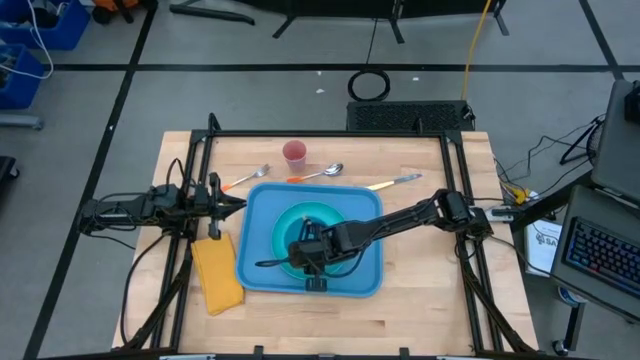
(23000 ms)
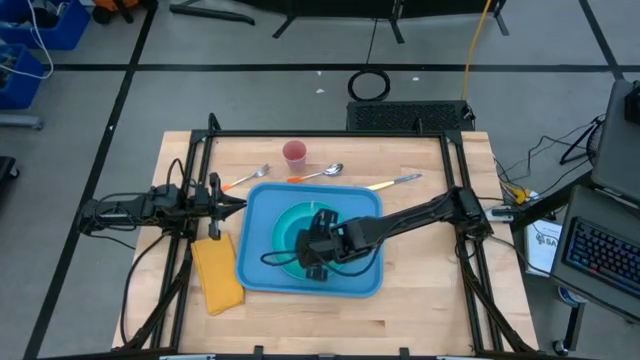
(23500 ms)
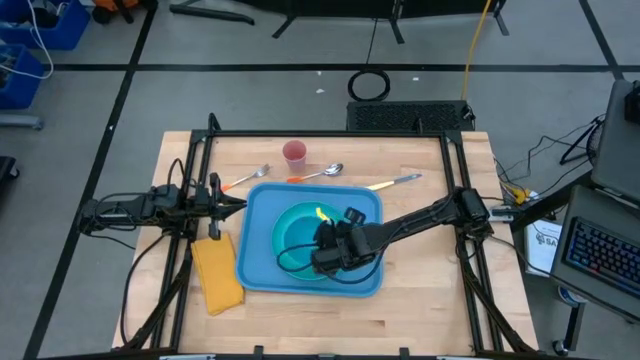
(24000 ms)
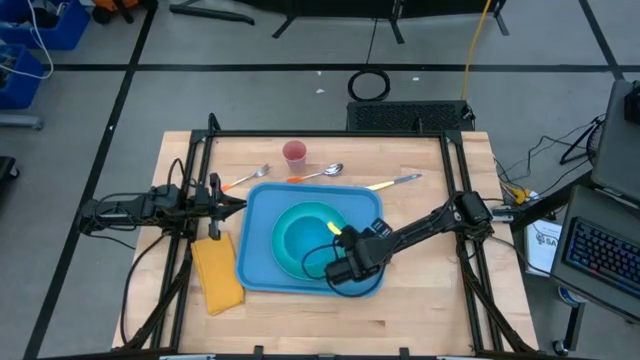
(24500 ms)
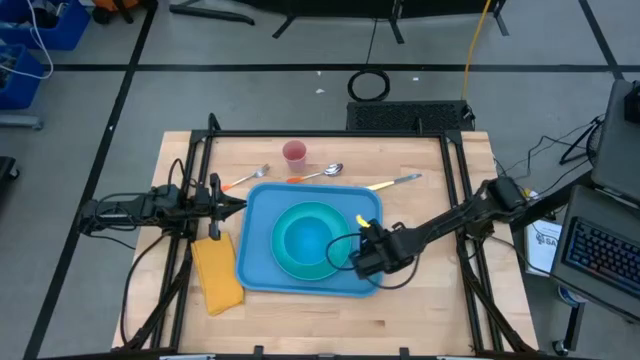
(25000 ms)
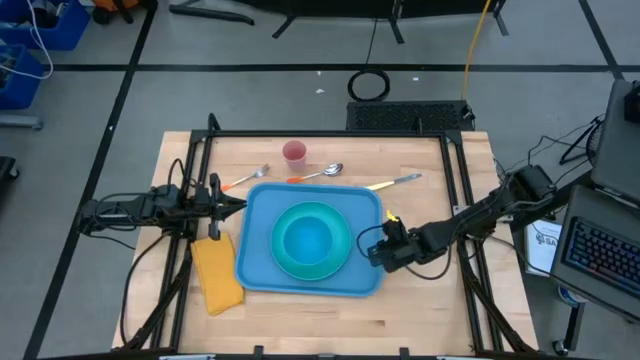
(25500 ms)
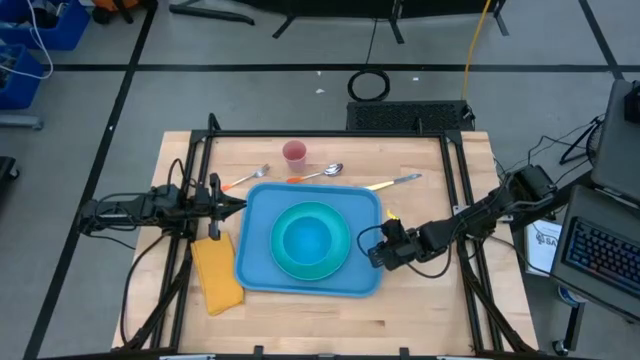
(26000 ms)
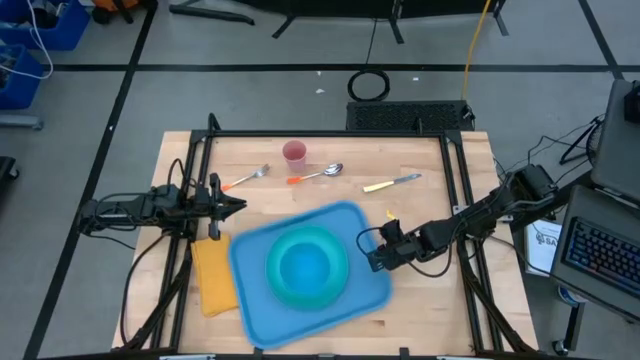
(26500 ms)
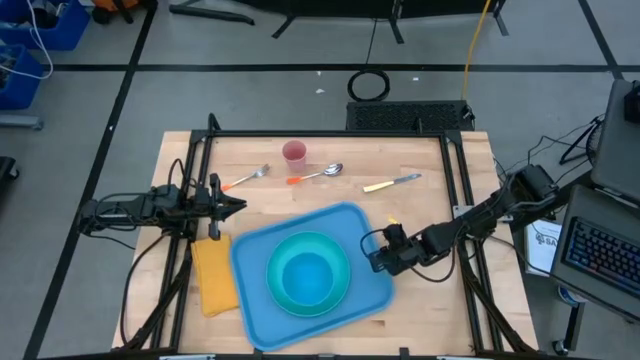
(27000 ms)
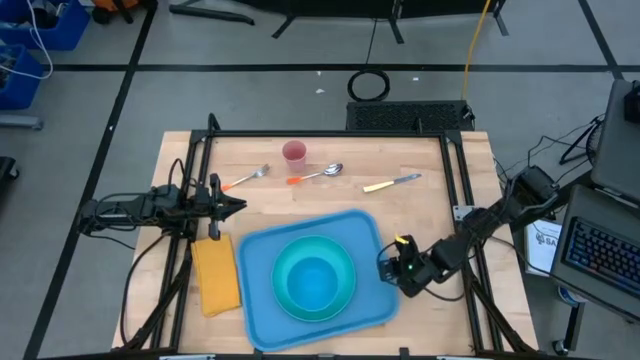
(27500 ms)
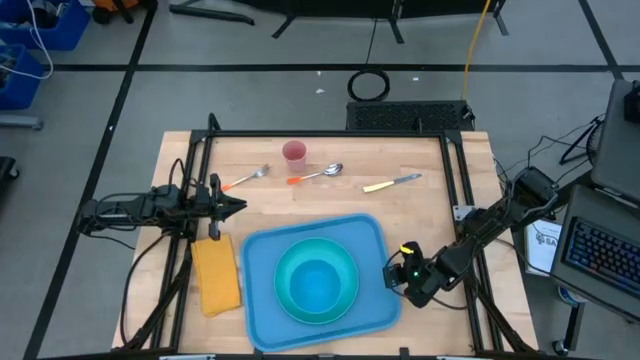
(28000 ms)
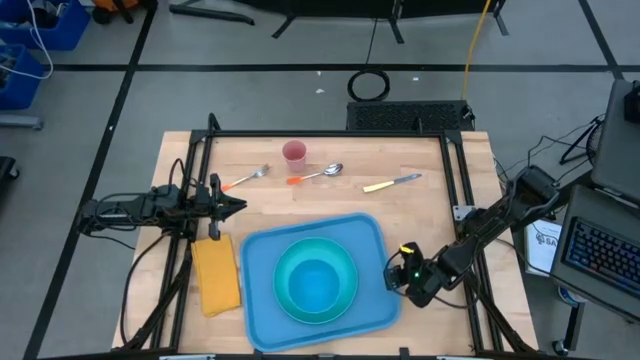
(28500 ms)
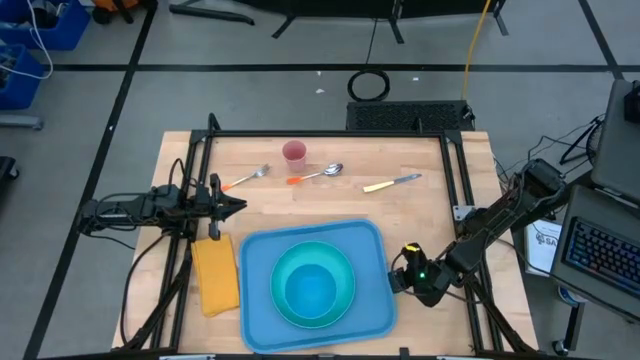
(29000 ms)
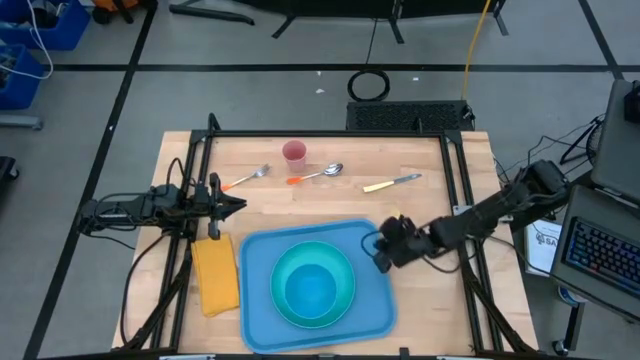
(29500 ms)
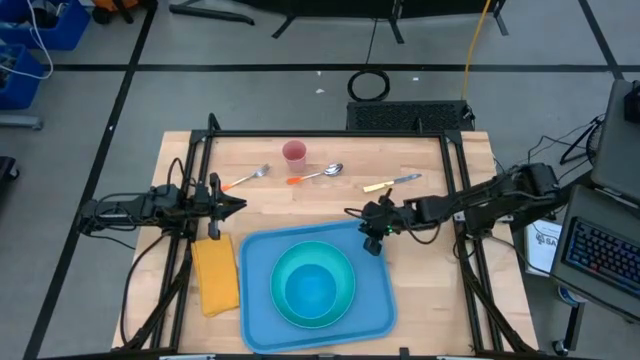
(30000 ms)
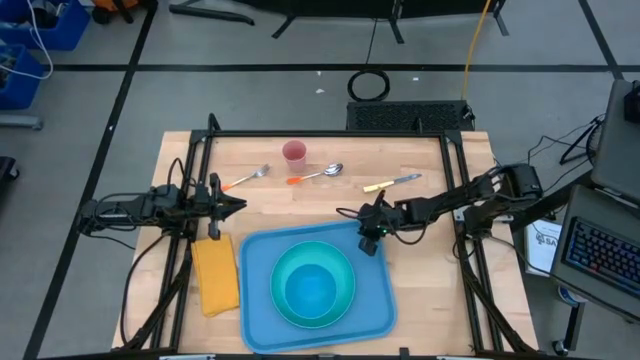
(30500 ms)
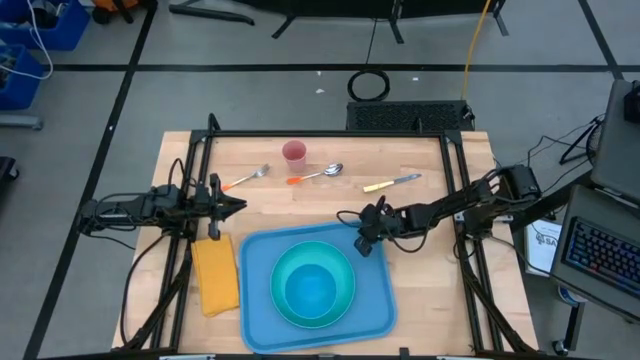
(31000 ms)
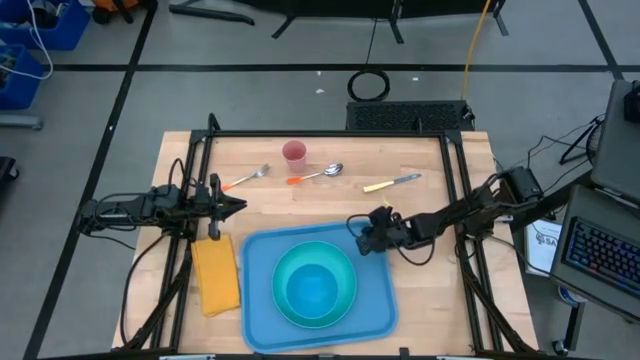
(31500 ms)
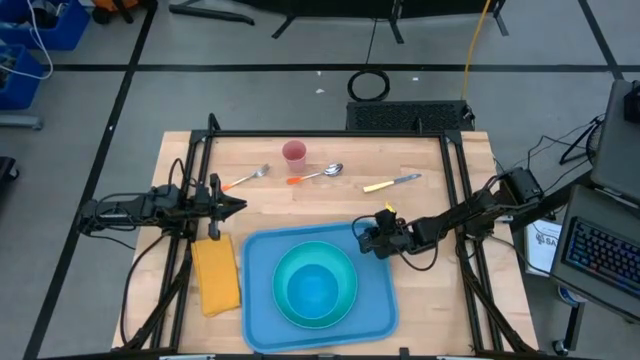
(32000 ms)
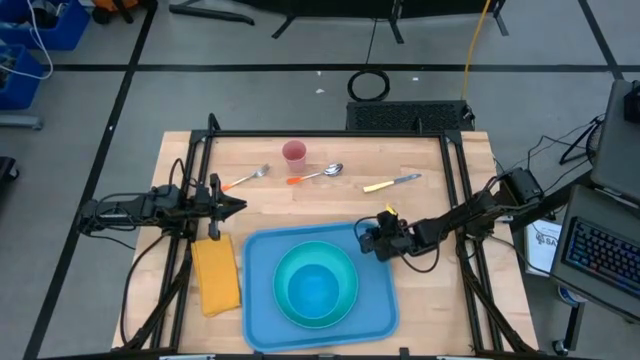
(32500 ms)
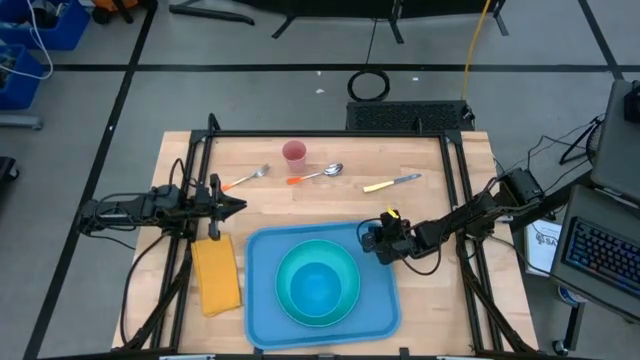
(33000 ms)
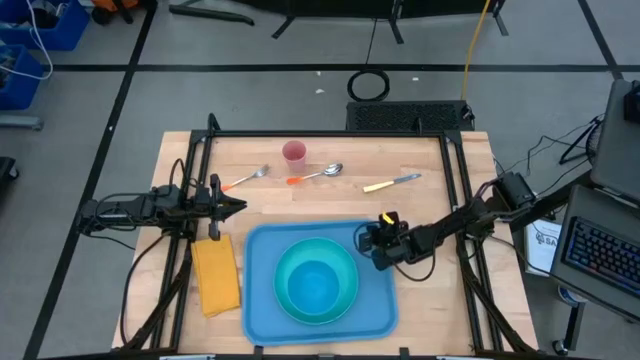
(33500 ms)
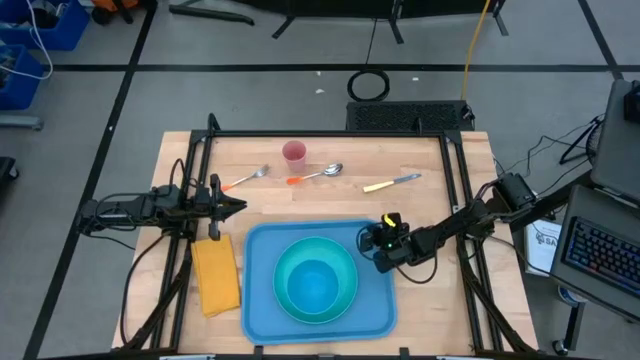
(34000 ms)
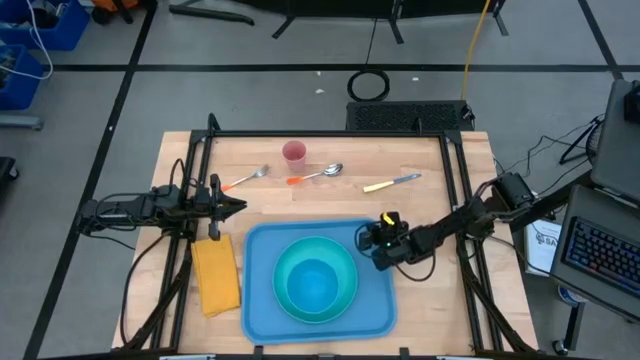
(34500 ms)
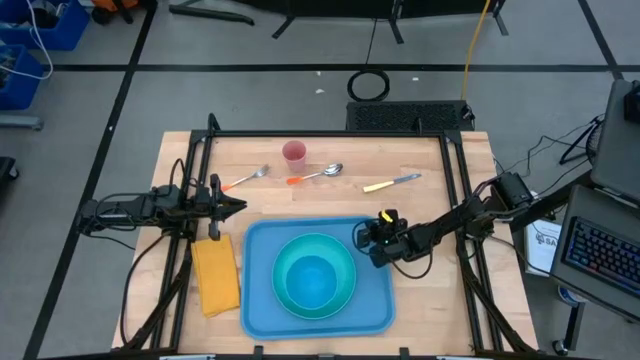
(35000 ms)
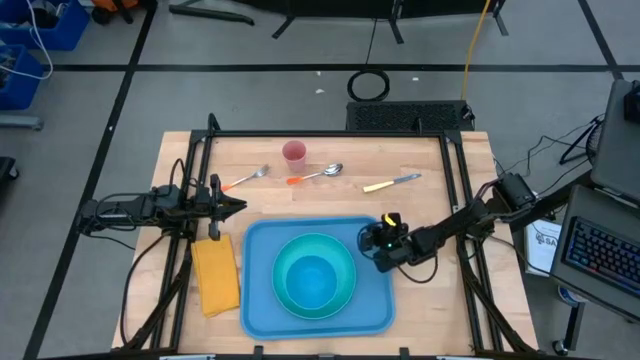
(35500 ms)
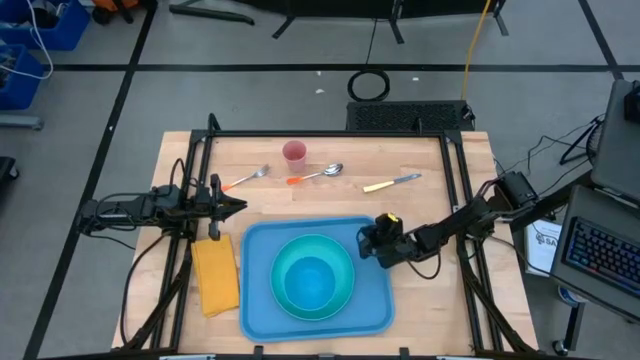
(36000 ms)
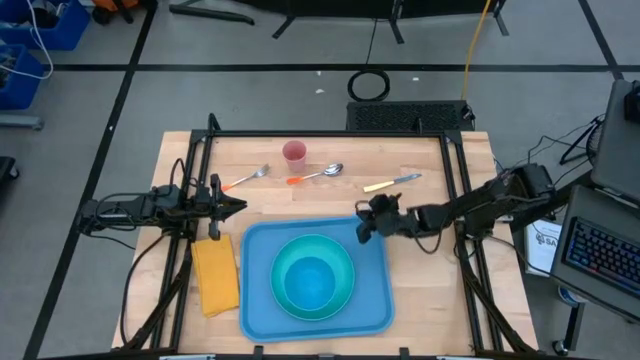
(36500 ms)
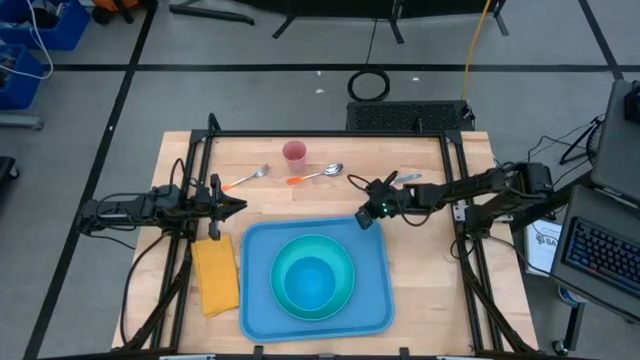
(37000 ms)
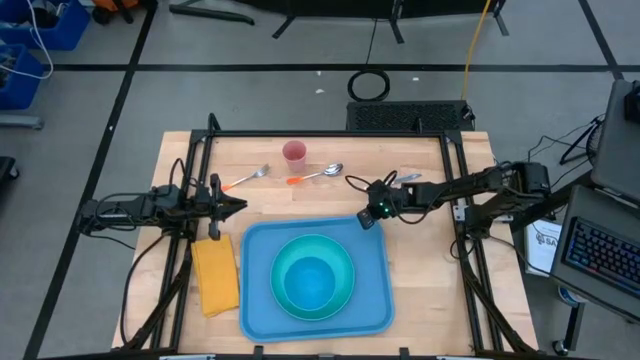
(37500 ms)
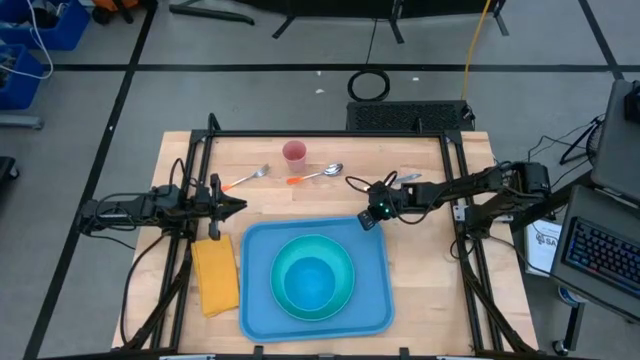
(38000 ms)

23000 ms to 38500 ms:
Task: Set up tray
Adjust the serving tray on the table

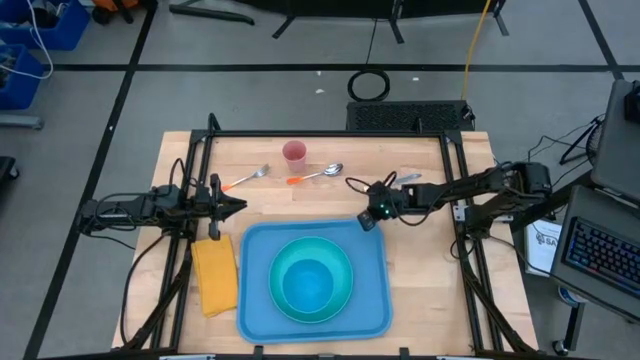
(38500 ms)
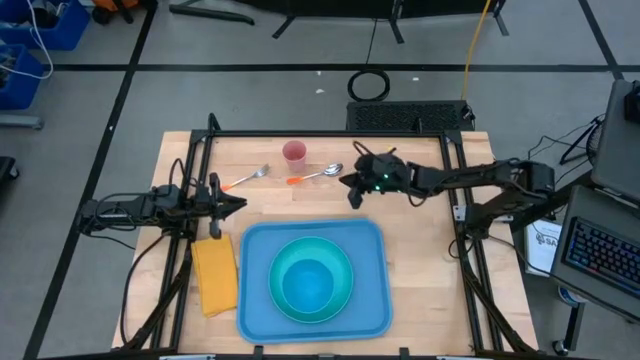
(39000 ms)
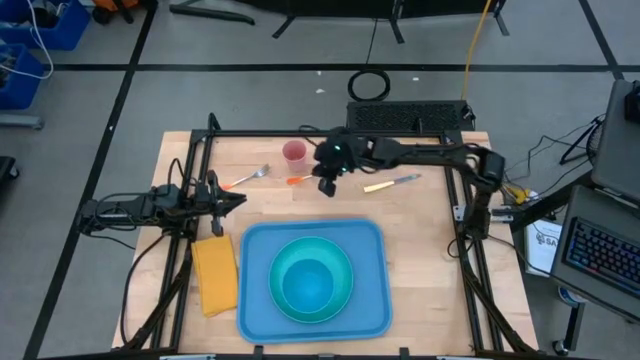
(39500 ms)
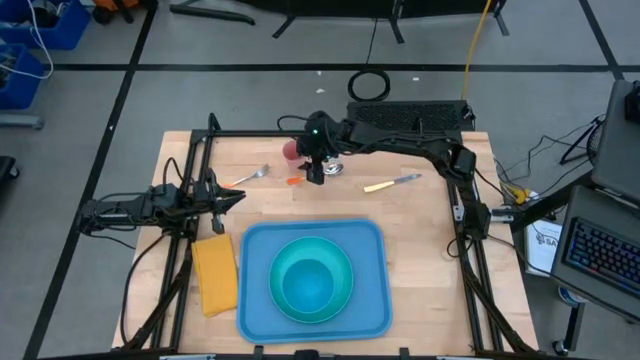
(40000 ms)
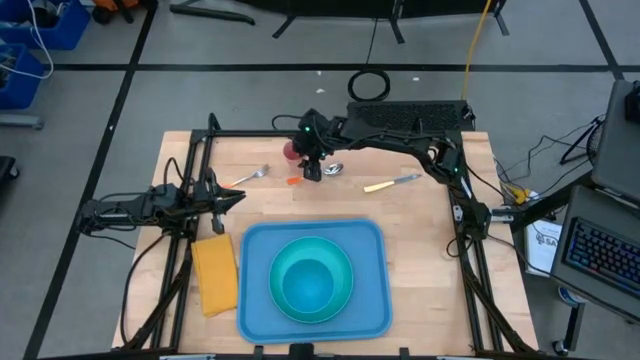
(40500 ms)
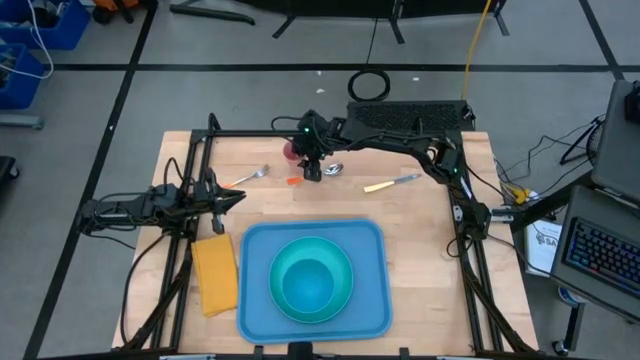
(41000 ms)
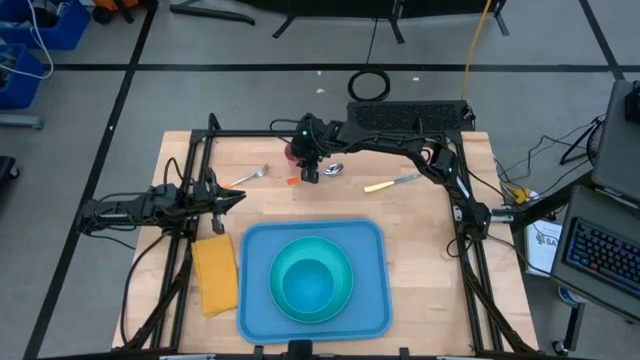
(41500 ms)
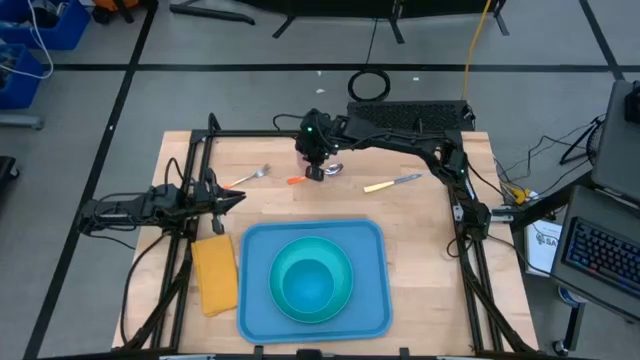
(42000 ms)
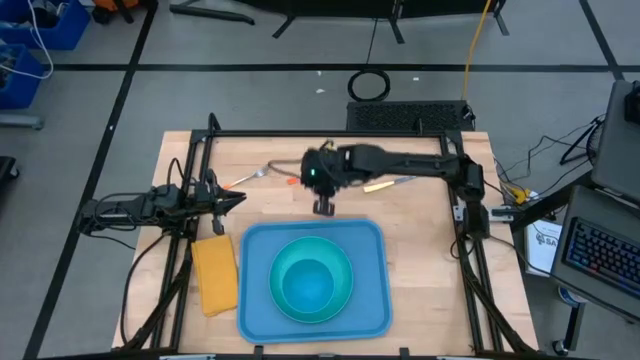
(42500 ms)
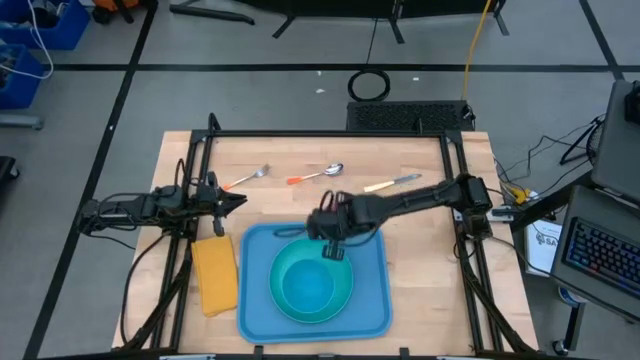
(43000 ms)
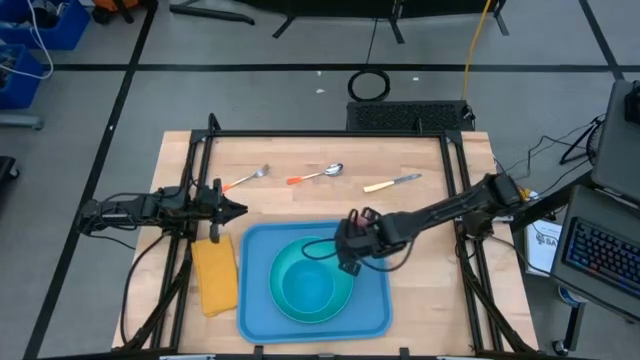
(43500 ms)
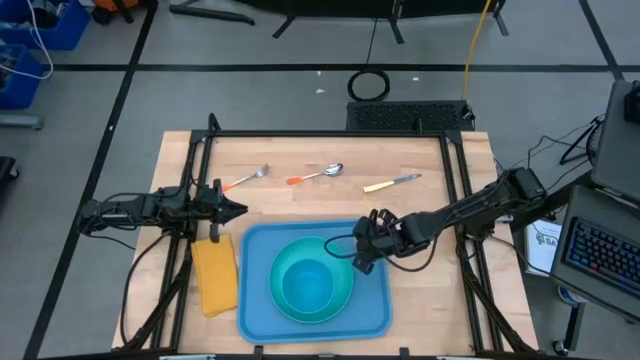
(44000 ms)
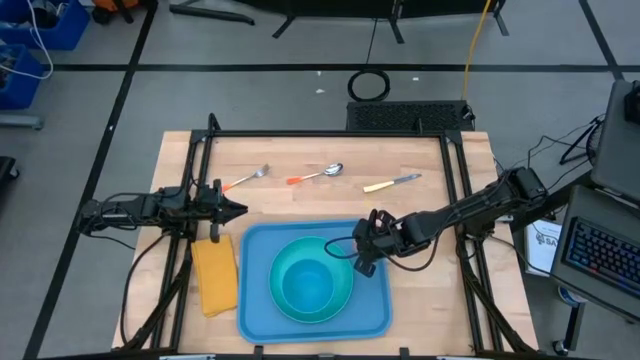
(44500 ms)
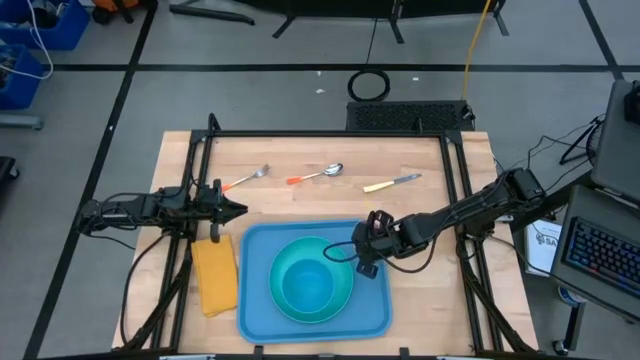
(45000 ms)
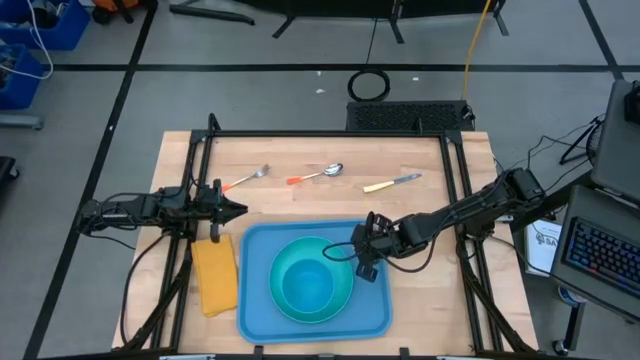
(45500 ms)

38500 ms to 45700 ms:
Put the cup on the serving tray to the top right of the plate
